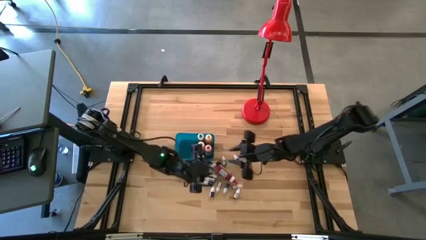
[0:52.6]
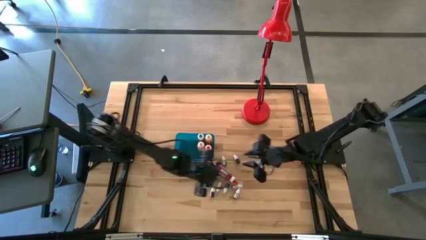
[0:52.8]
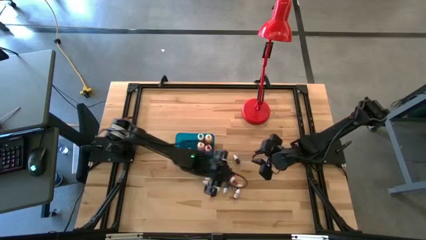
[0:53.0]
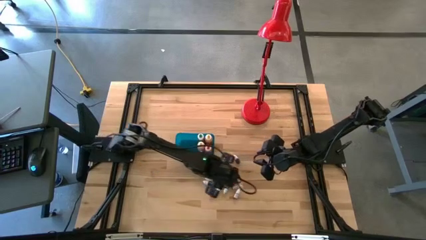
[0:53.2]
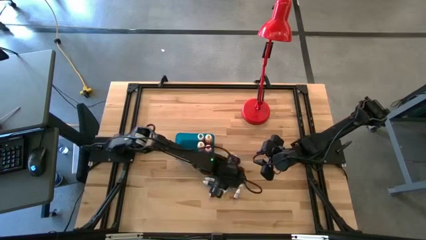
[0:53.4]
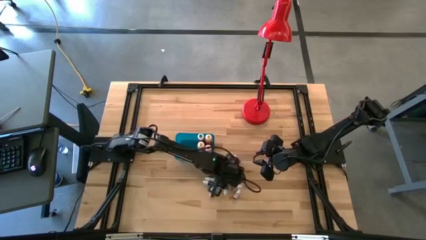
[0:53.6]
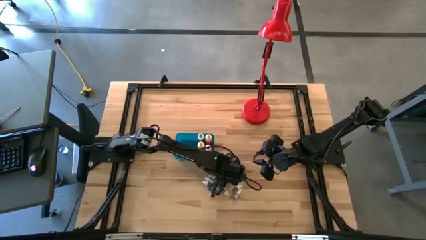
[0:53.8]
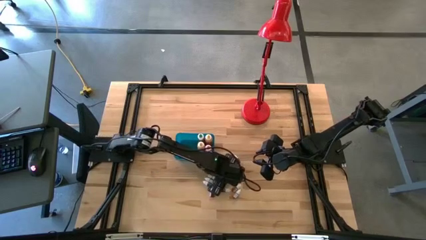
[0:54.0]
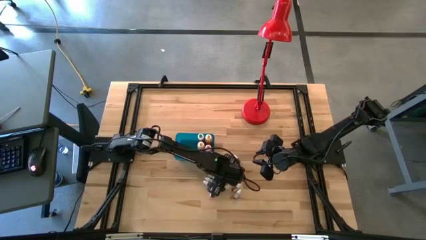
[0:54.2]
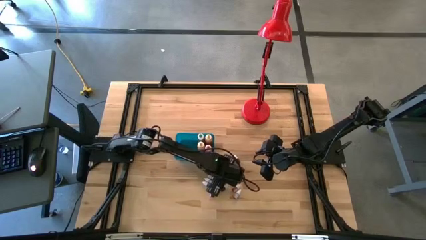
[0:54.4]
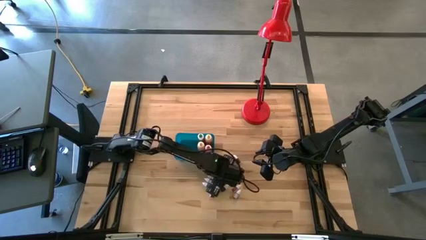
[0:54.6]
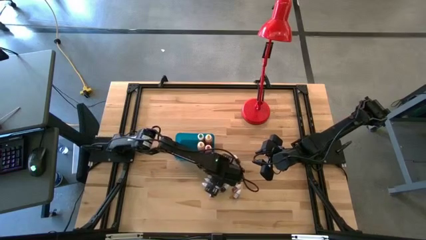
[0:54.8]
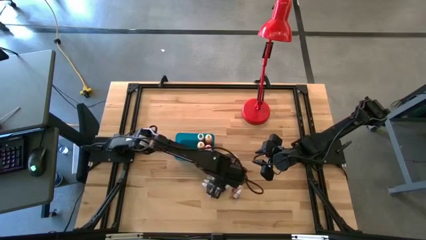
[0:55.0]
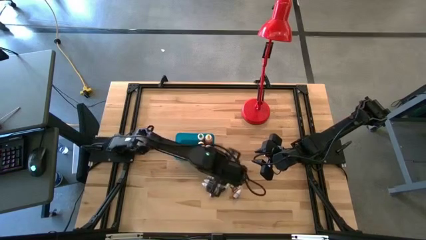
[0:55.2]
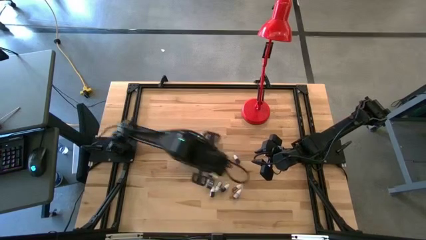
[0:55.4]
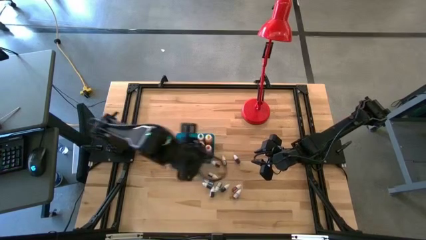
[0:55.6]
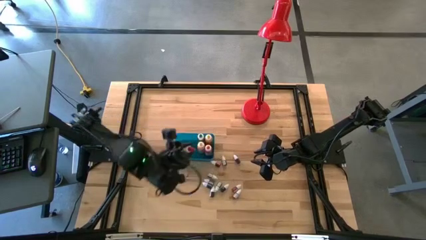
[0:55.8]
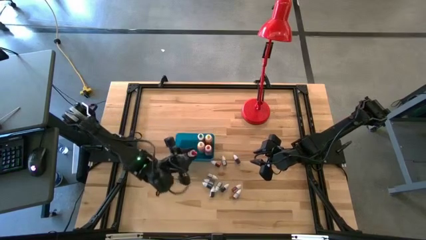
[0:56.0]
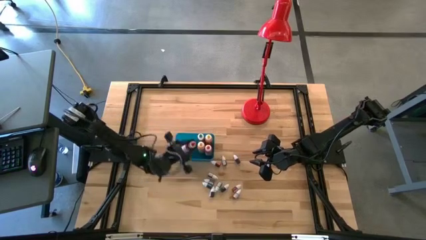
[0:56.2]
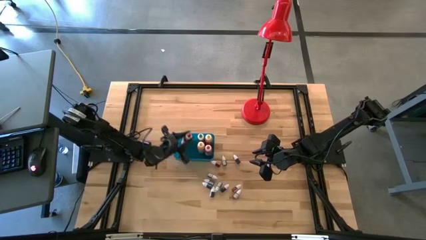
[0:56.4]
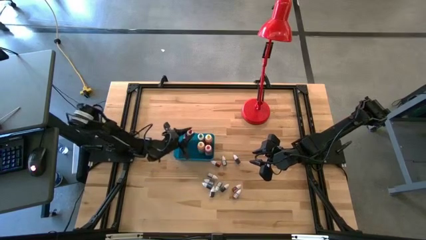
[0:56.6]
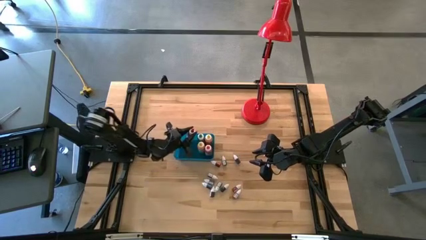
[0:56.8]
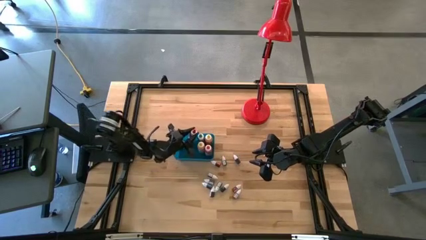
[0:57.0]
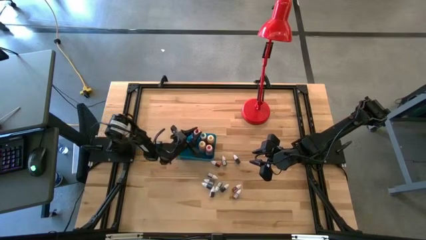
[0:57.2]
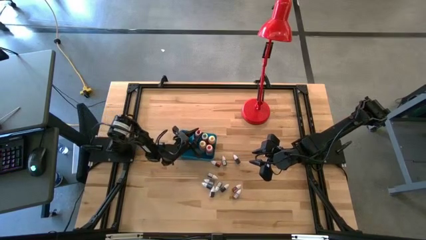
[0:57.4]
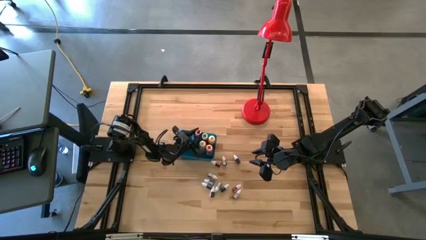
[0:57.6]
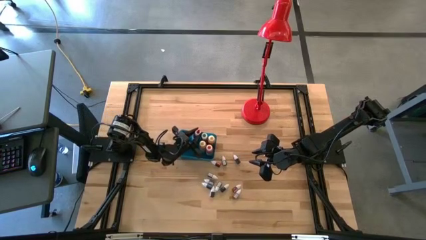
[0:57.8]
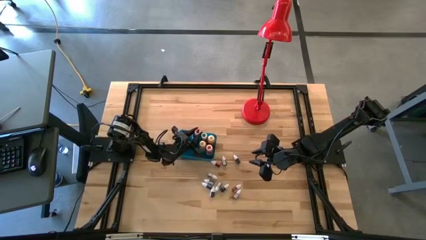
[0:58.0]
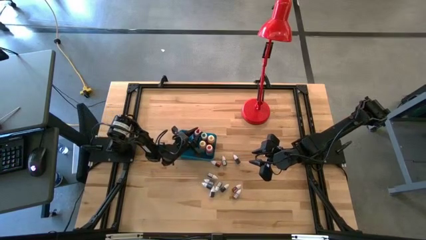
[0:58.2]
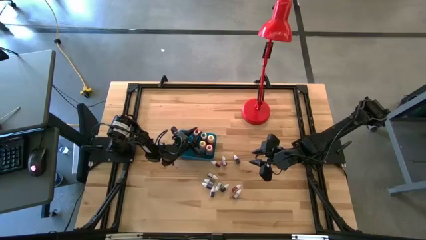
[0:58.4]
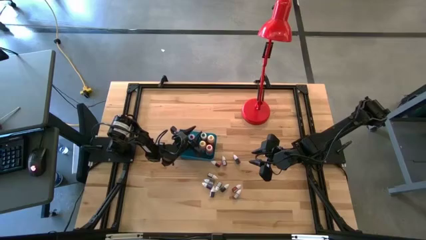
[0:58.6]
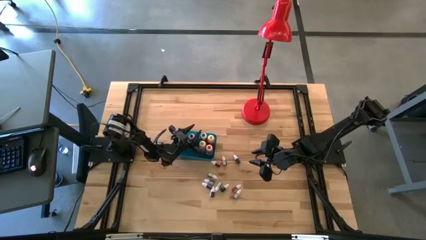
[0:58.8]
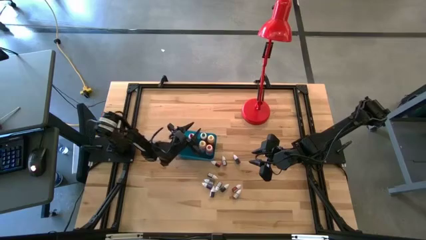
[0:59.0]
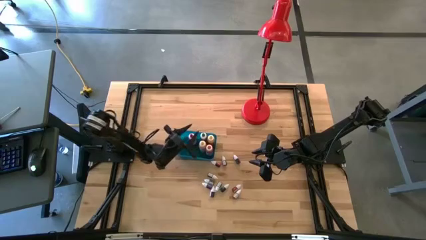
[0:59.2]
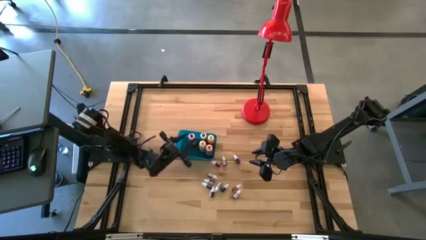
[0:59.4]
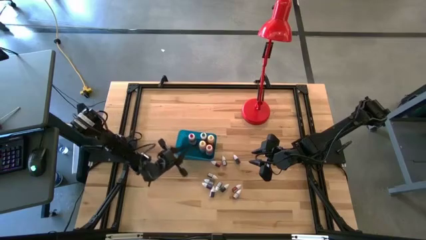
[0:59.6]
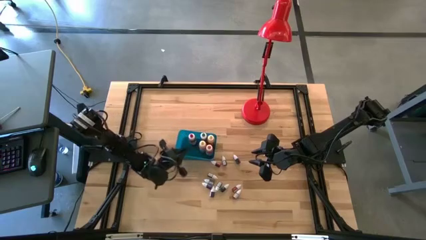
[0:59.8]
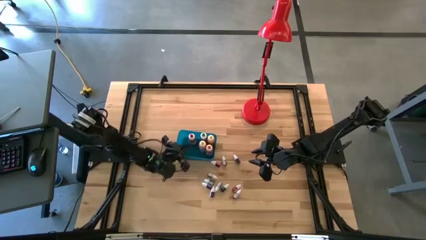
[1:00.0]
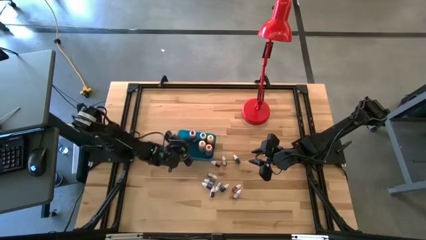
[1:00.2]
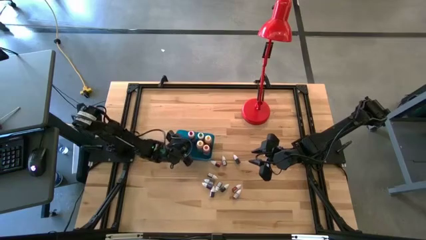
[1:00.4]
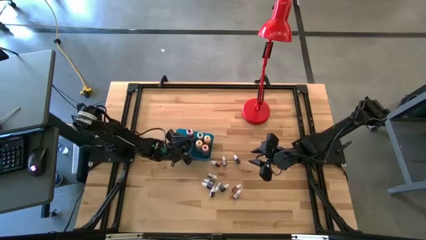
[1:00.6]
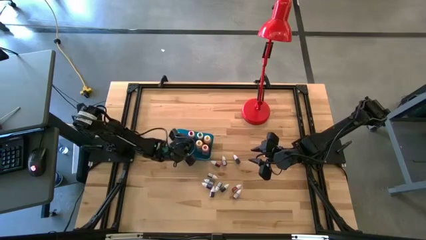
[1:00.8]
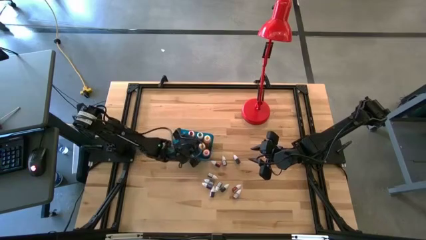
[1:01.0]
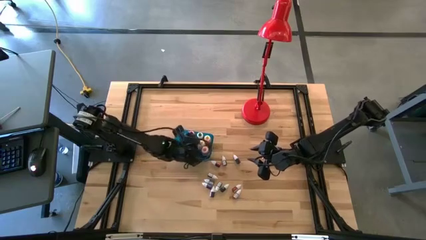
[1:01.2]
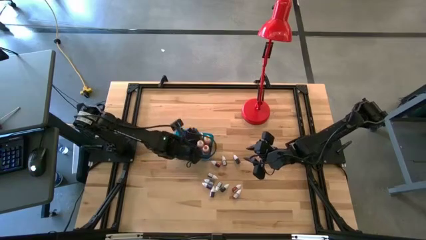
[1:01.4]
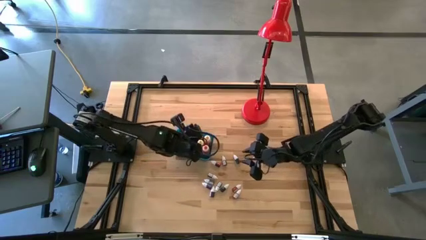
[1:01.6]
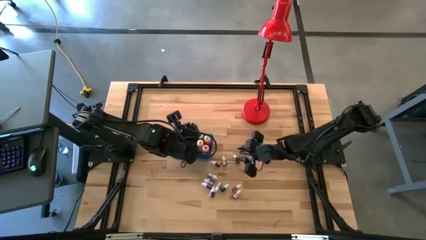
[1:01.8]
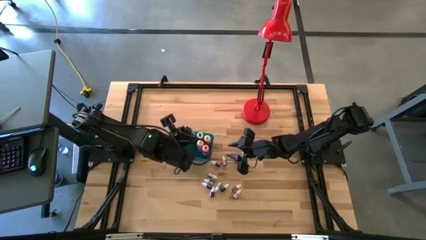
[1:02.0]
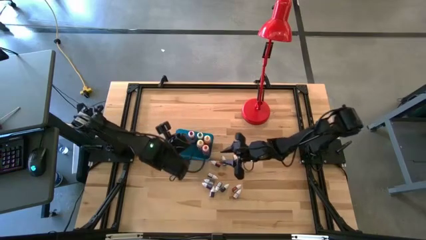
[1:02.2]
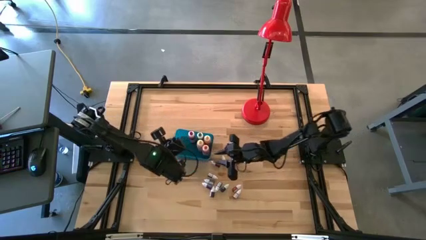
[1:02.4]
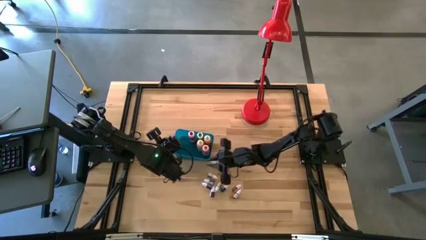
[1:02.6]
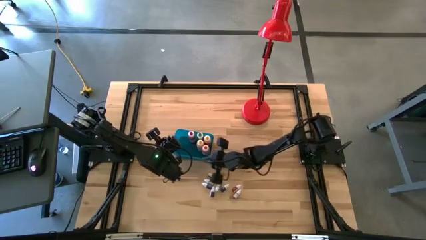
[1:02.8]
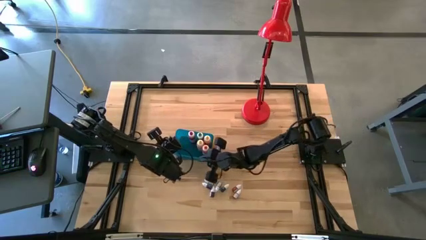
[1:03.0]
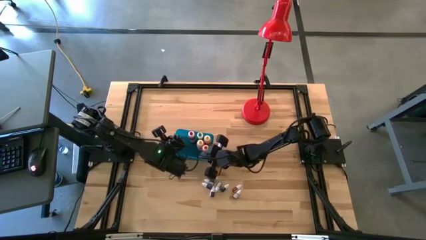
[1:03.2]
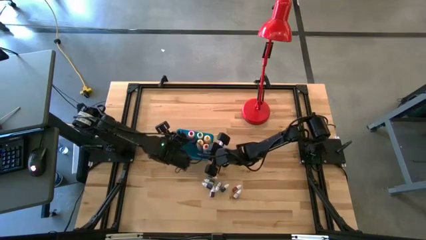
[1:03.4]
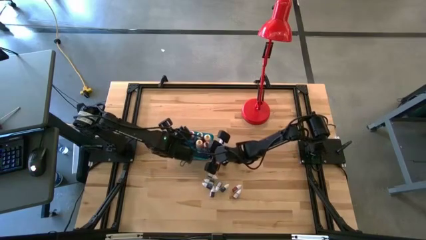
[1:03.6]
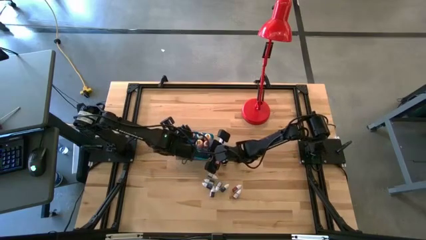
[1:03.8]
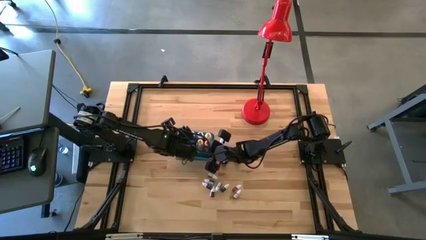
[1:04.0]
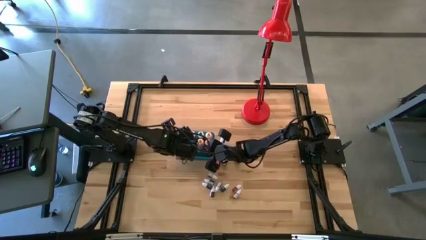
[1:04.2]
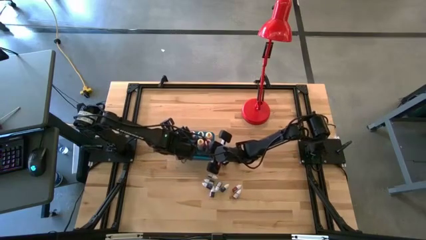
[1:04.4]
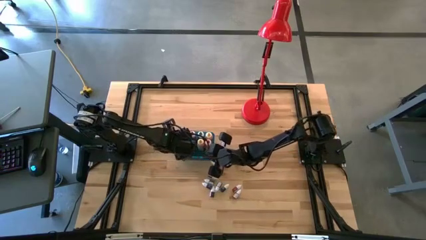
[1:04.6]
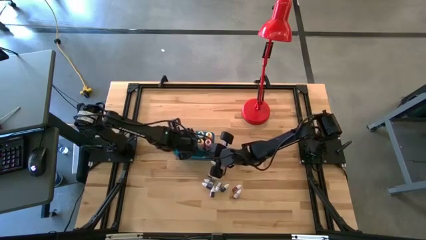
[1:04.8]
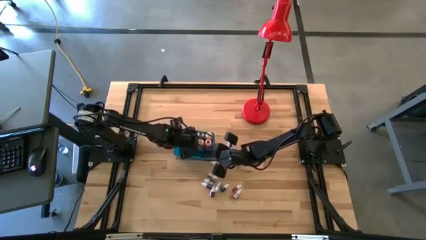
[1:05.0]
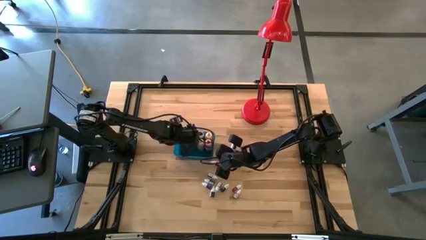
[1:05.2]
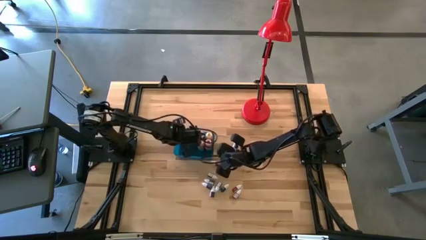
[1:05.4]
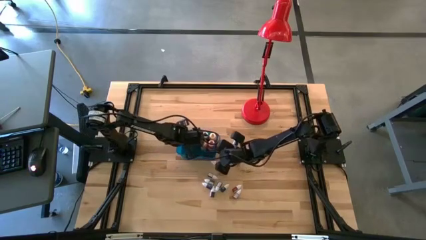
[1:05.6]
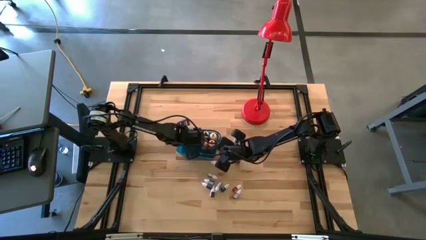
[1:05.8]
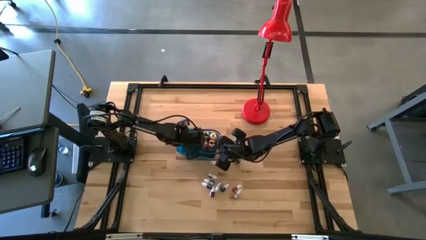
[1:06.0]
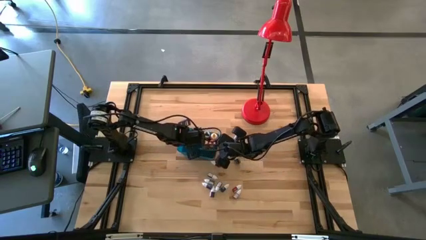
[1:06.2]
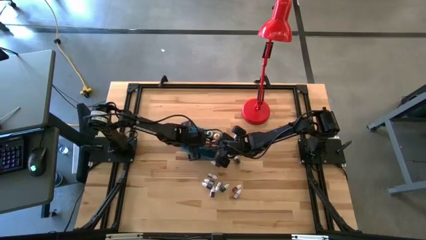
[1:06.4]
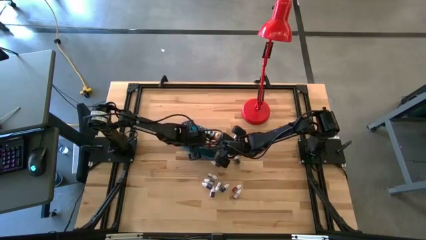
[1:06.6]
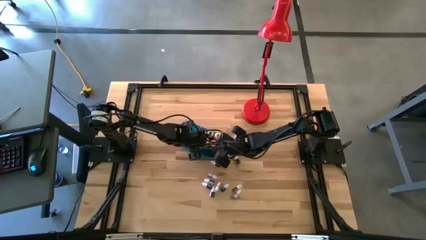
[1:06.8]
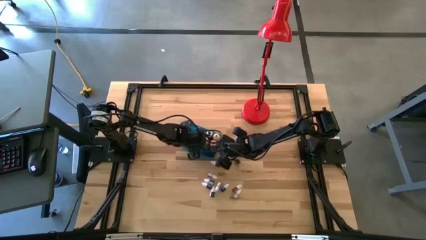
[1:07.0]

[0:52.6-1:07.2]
Task: Pick & Place food coloring
Put the large red food coloring into the blue bin

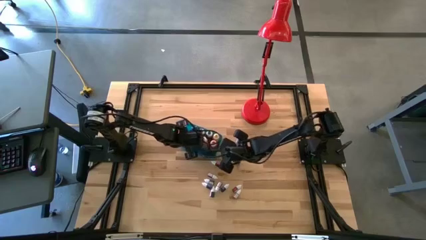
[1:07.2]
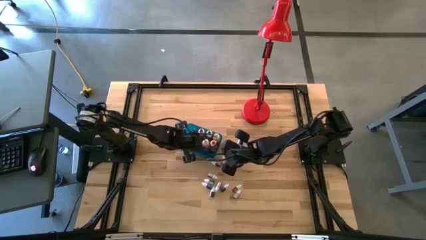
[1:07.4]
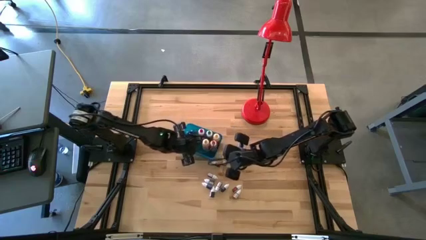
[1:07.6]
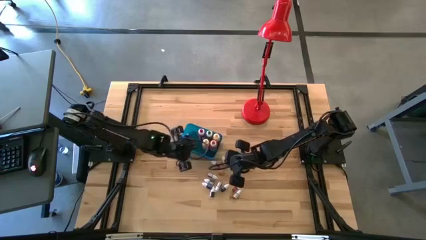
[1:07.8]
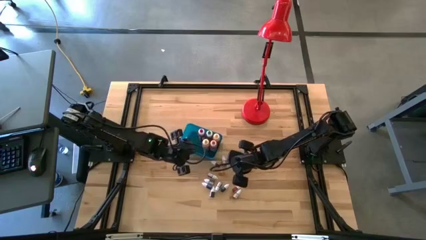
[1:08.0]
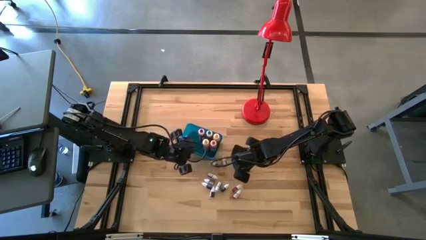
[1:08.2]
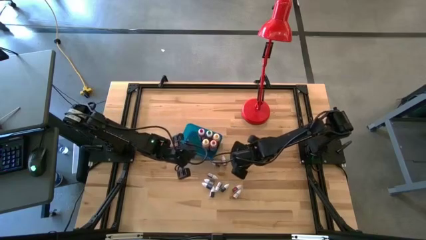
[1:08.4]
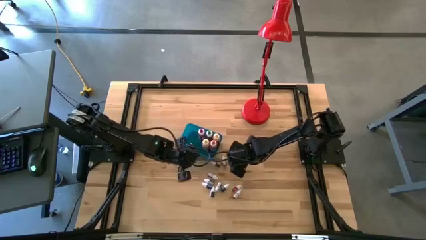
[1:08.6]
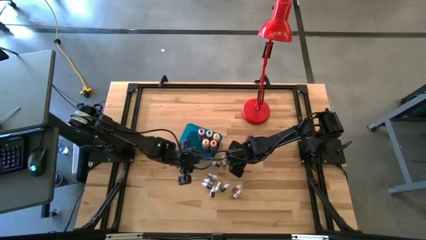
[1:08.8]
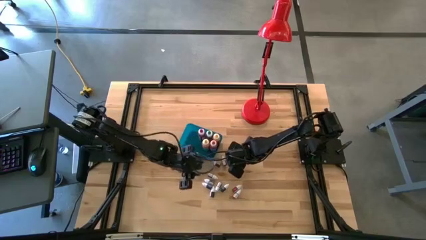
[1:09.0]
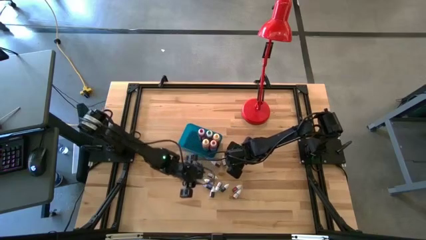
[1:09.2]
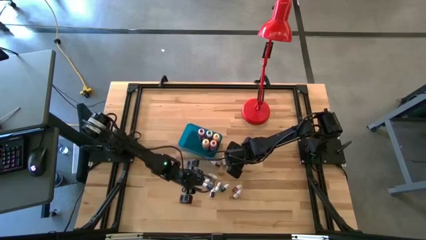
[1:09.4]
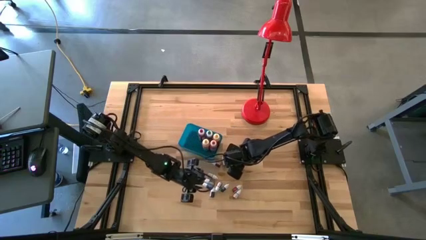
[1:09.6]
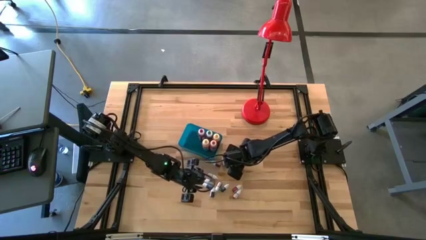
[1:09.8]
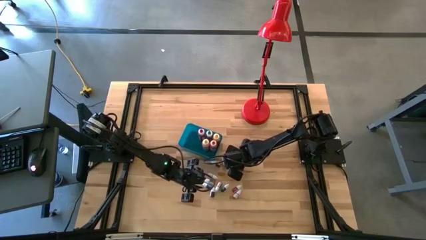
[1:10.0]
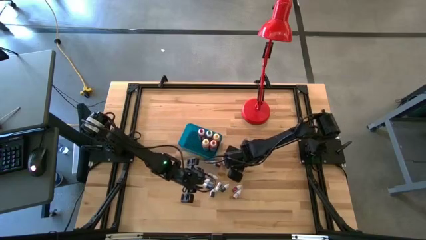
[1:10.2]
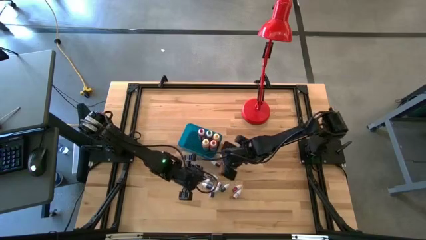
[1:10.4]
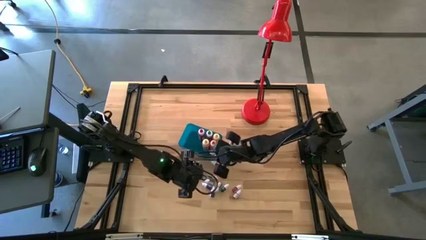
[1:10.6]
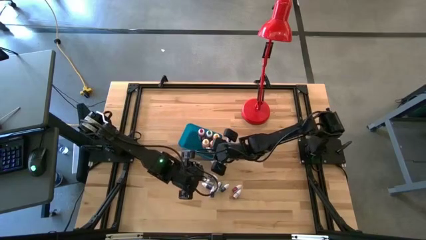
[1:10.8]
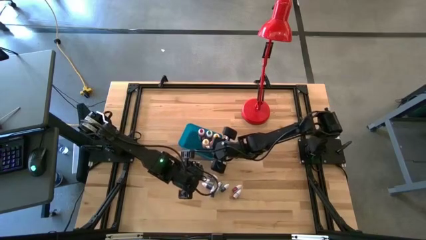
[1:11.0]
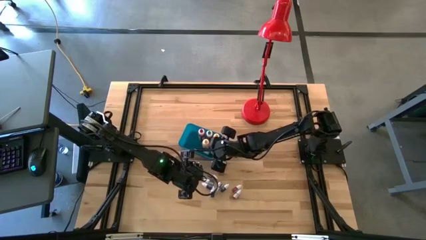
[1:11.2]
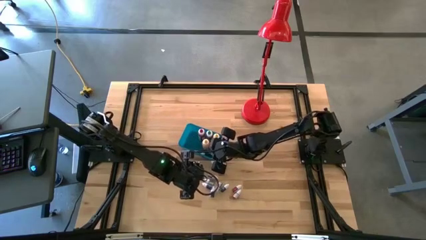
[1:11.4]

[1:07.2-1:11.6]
Put the small green food coloring into the blue bin
